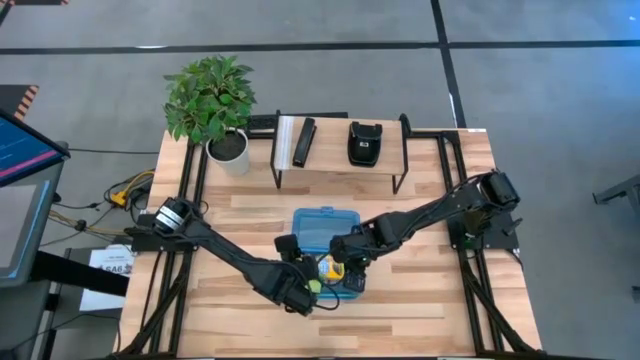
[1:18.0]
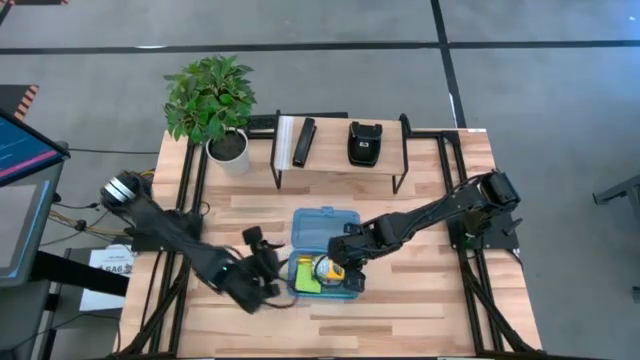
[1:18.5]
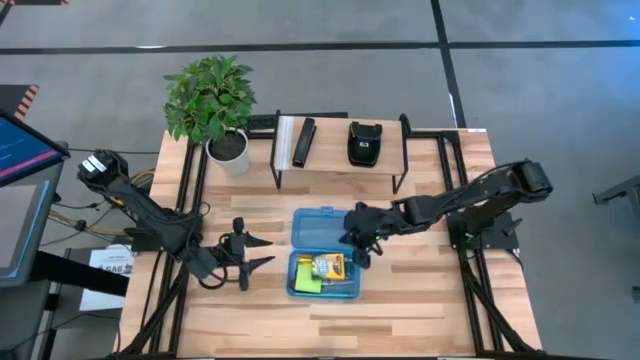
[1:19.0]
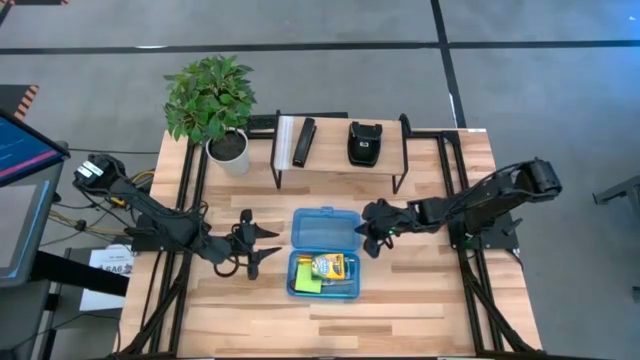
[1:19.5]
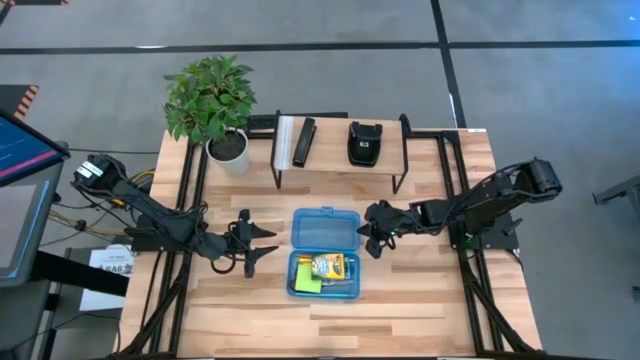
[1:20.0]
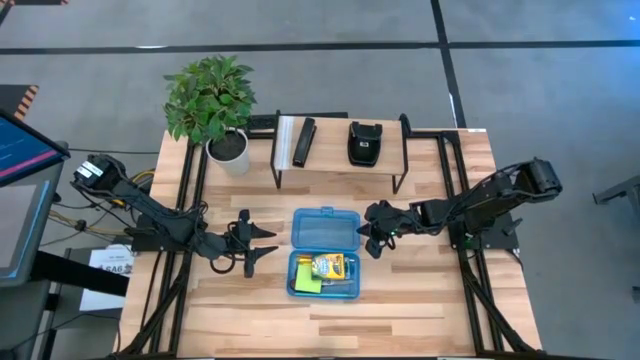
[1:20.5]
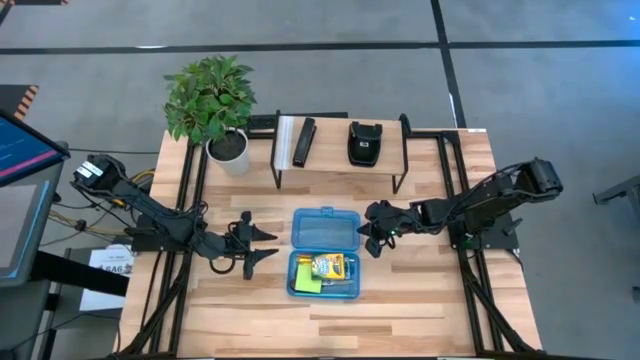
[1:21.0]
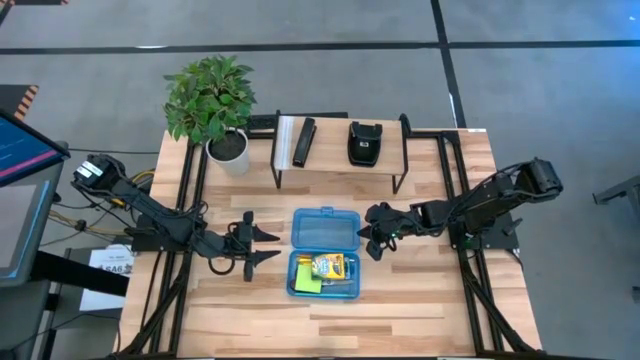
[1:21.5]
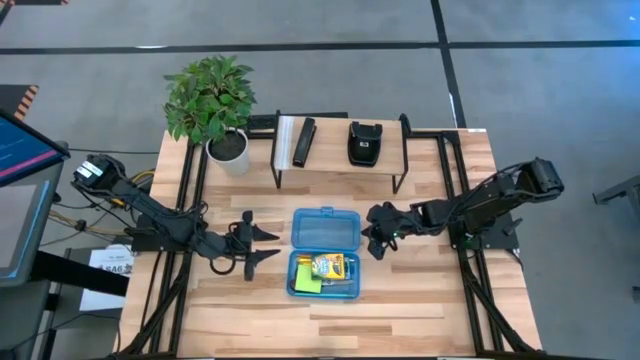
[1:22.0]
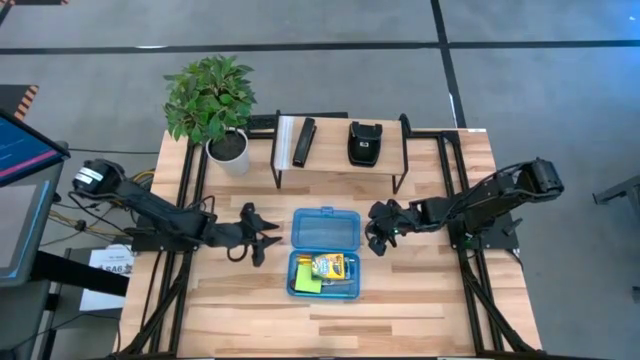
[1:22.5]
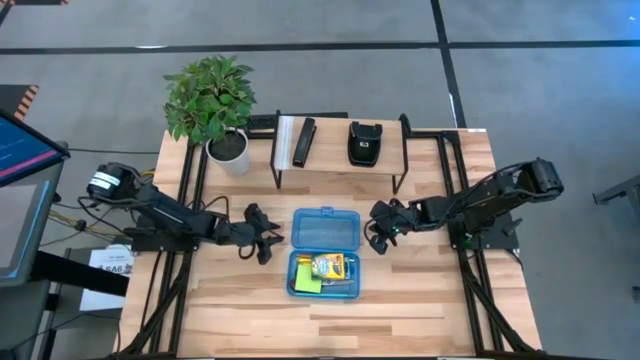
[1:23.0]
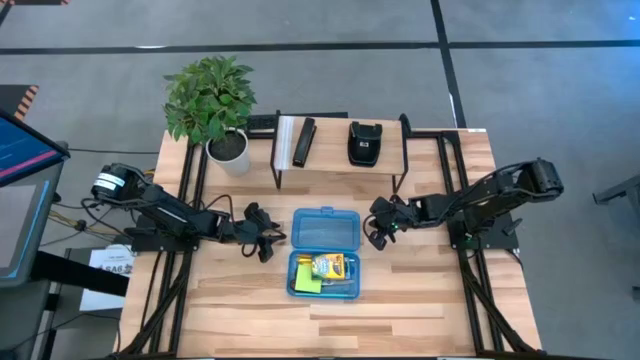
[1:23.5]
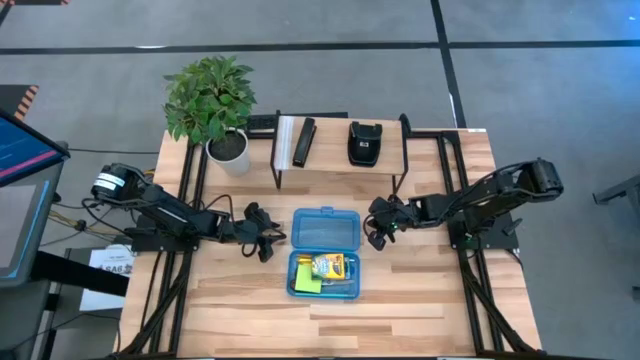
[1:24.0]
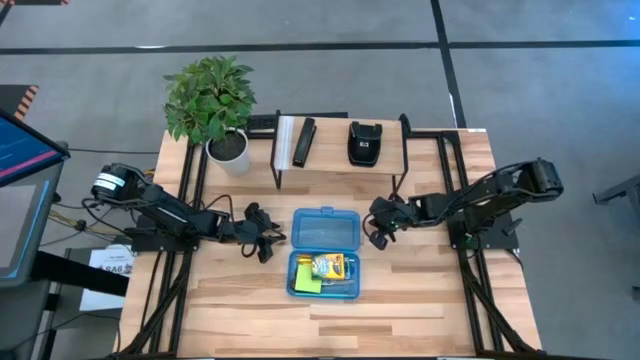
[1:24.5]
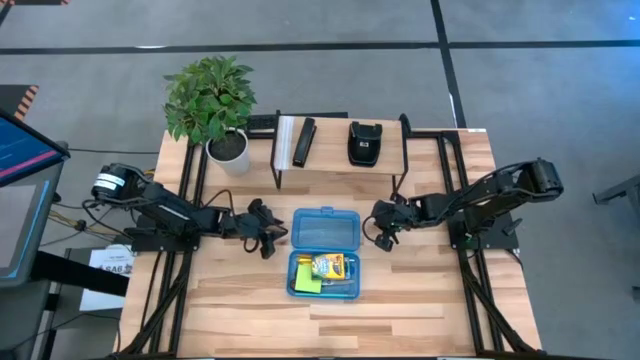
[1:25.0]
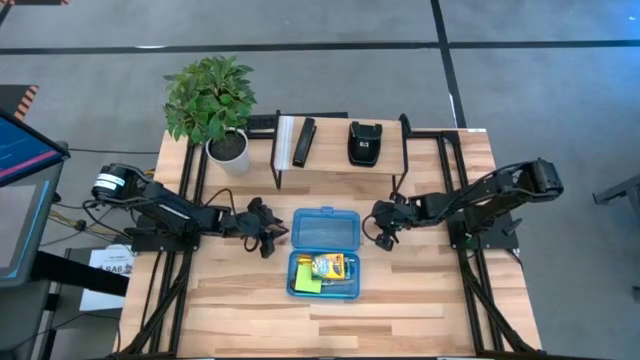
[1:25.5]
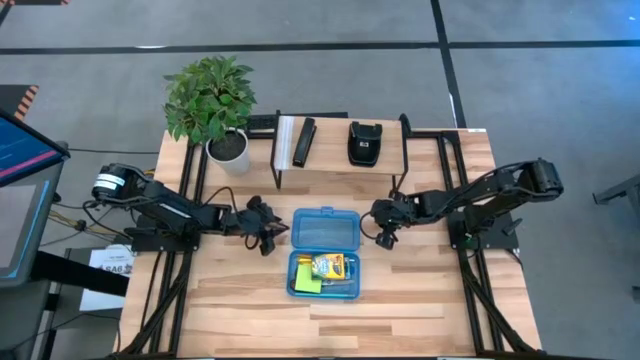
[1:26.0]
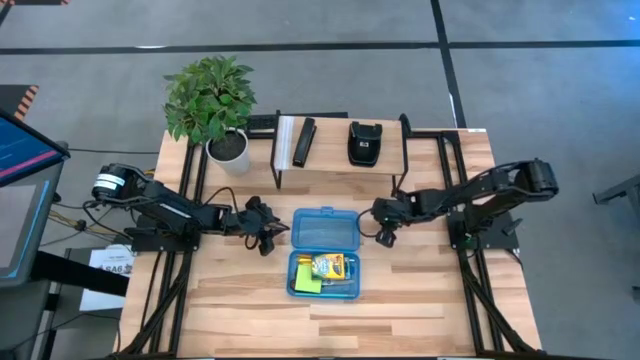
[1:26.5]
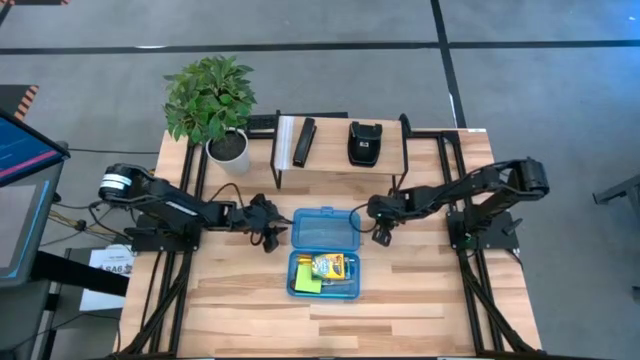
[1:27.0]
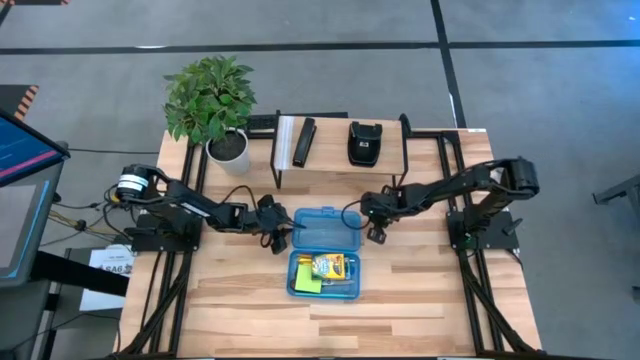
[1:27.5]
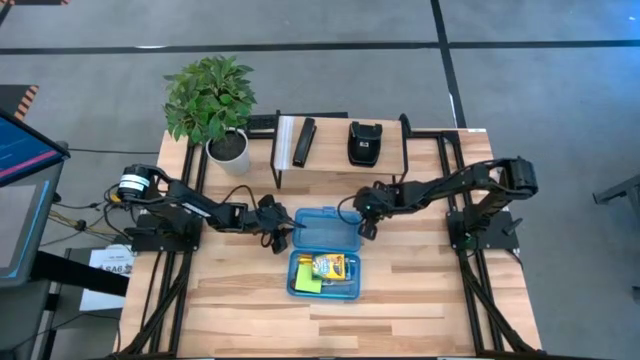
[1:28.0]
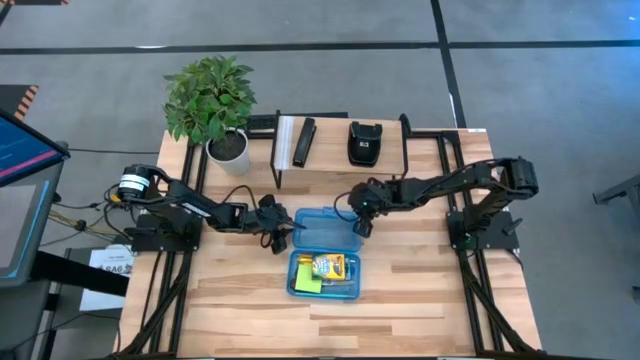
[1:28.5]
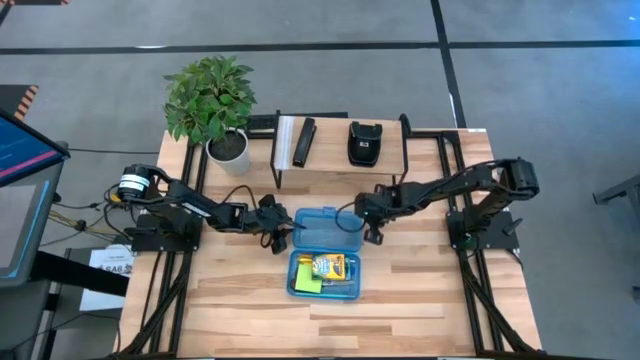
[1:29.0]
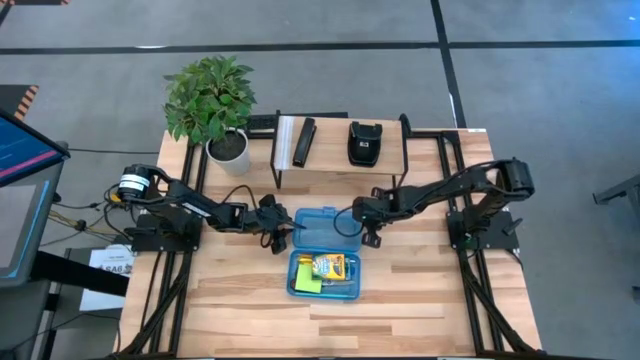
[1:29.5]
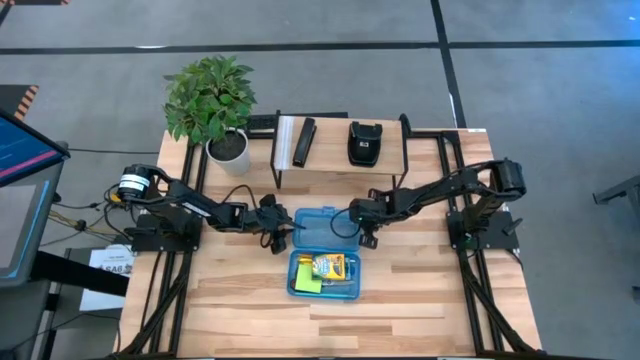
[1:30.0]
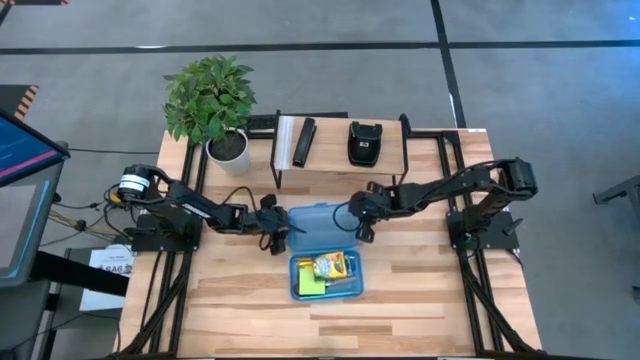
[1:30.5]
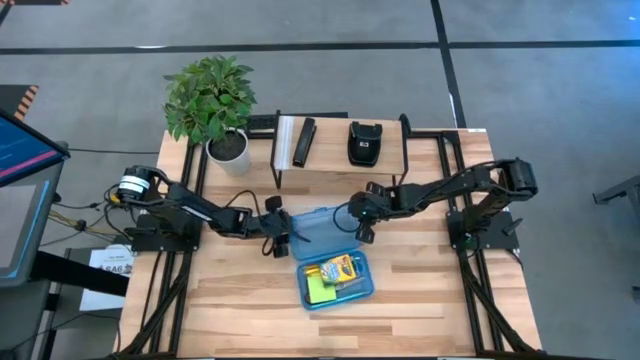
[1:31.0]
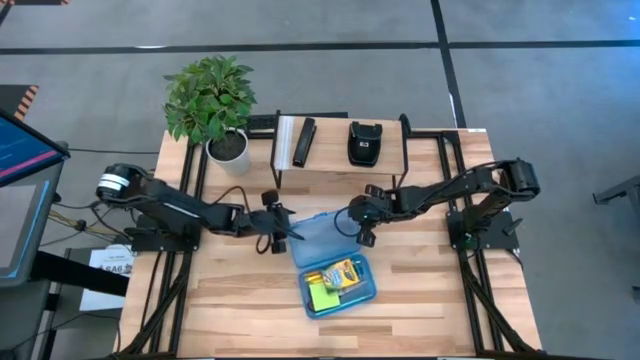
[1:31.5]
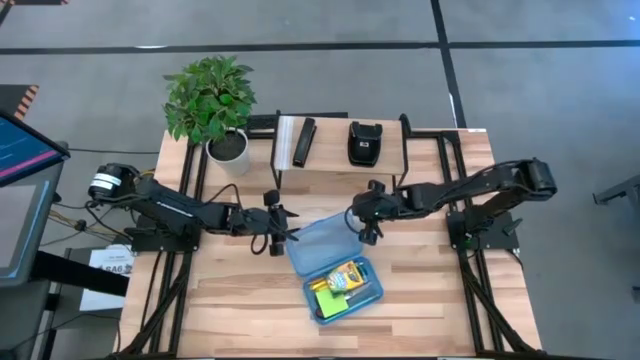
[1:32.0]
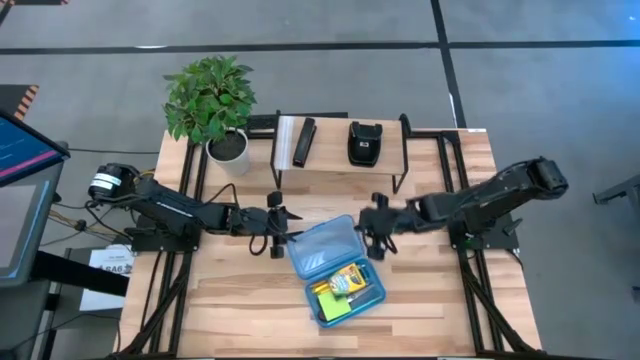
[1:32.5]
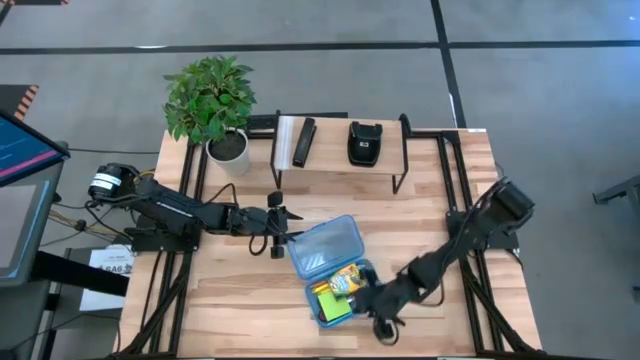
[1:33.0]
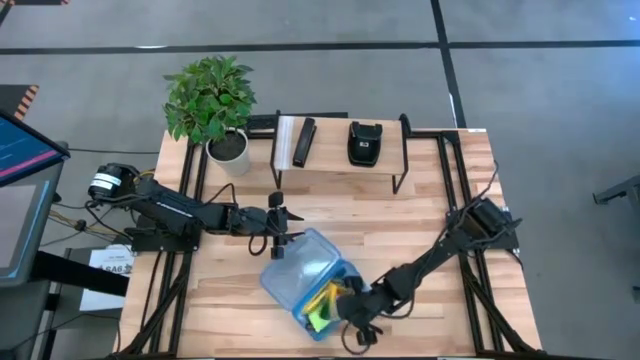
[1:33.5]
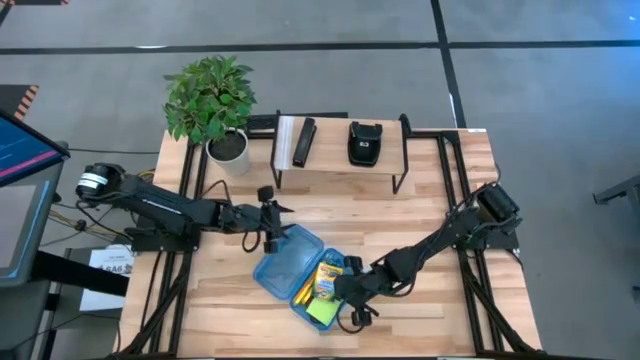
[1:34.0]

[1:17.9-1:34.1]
Task: Pack school essentials
Close the supply box

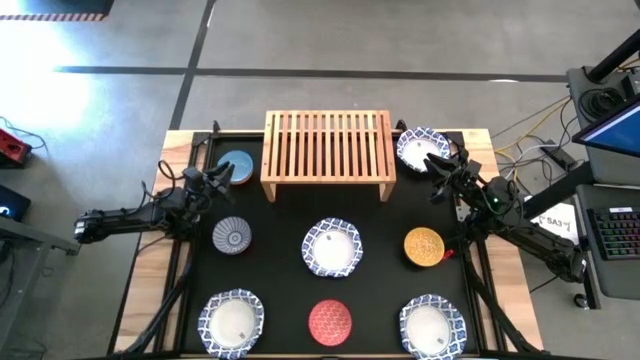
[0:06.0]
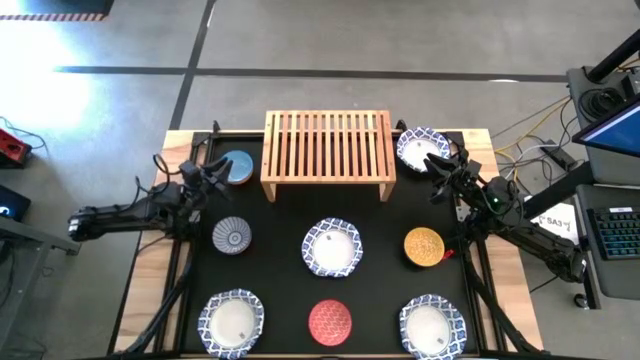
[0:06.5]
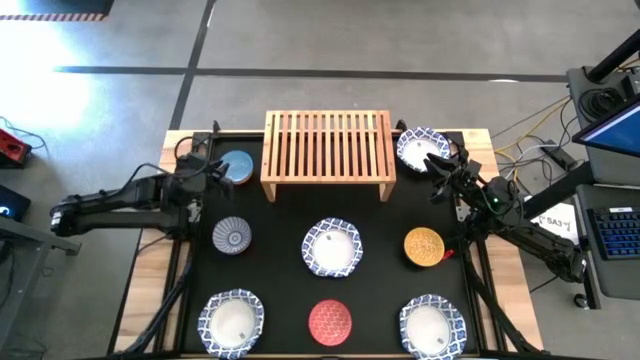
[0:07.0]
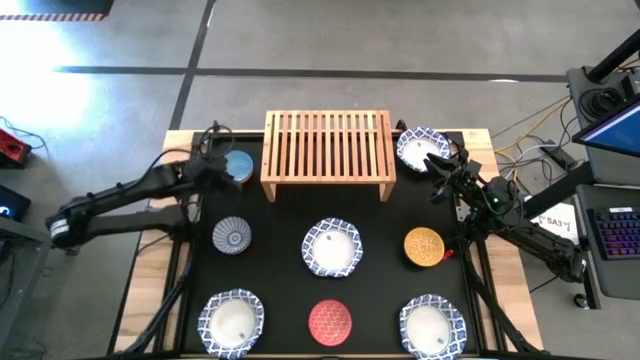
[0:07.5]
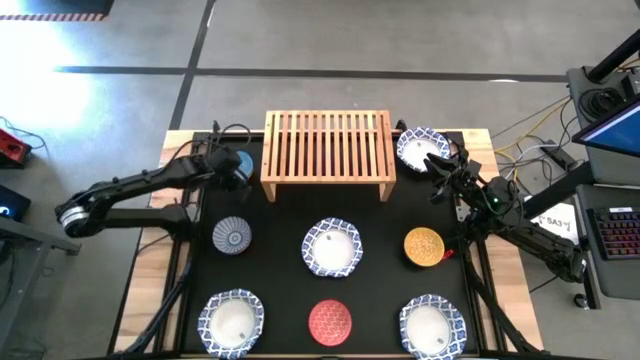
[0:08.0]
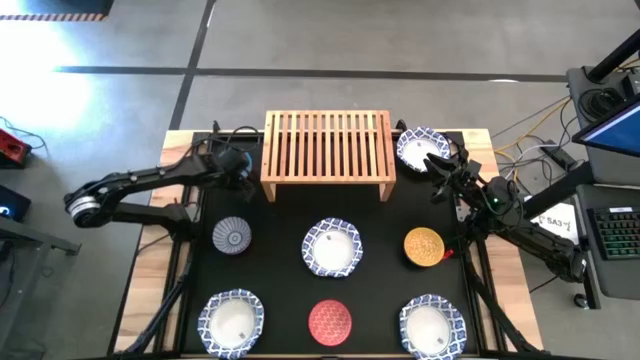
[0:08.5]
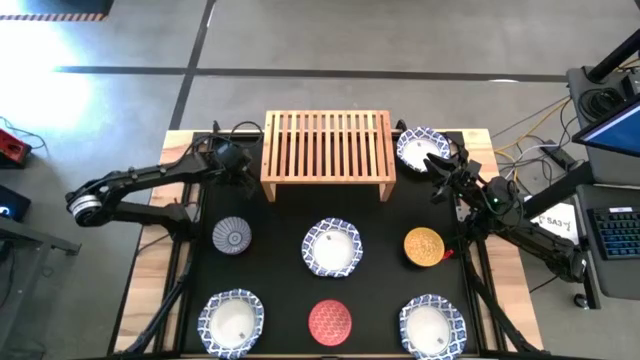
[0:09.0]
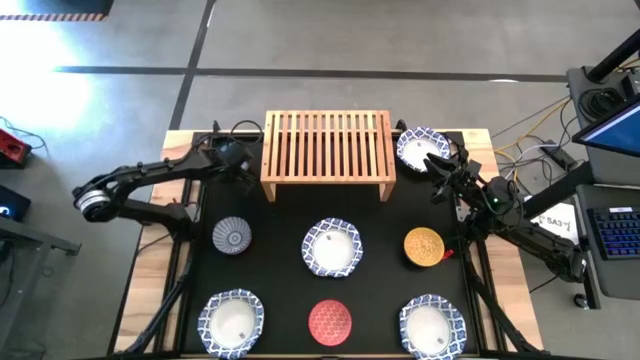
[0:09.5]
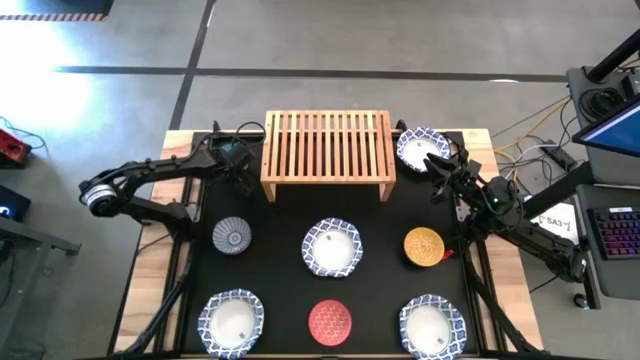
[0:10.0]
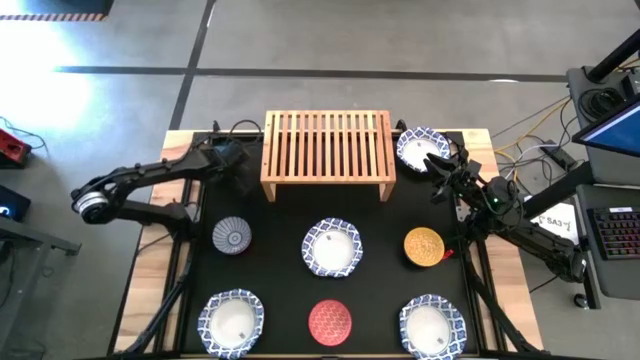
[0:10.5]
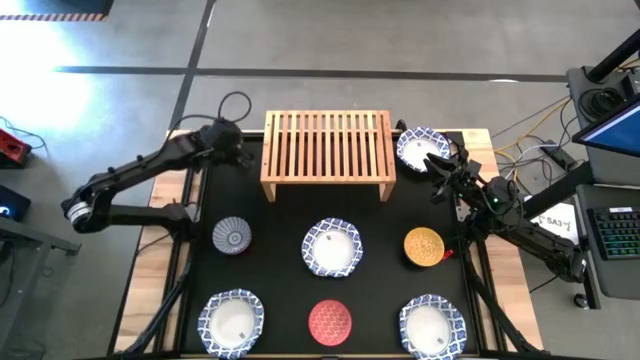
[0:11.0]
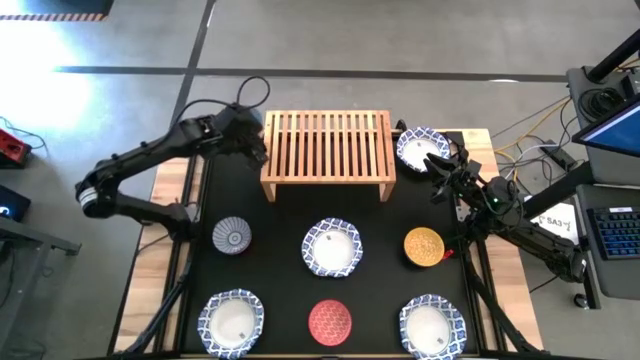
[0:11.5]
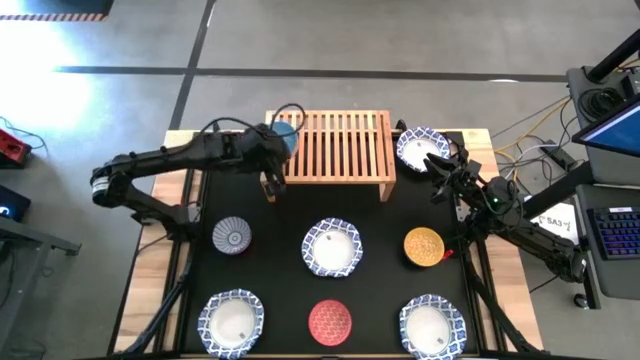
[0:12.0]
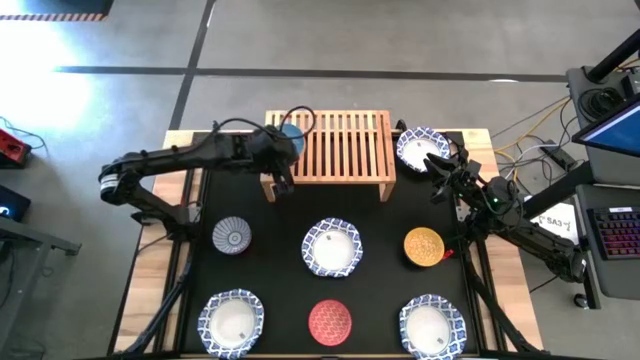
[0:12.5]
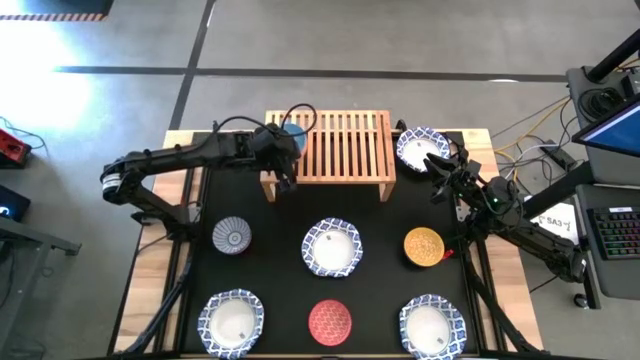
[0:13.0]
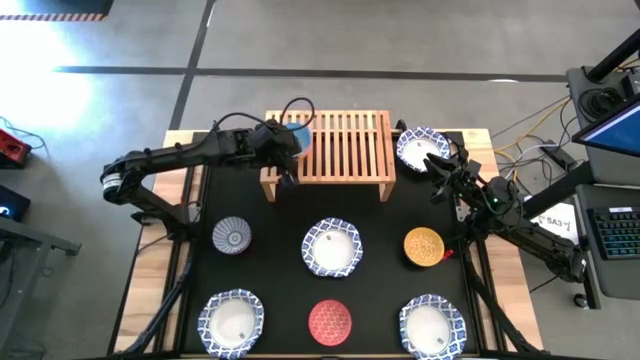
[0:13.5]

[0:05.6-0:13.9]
Task: Place and stack bowls onto a shelf
Put the blue bowl on the shelf
